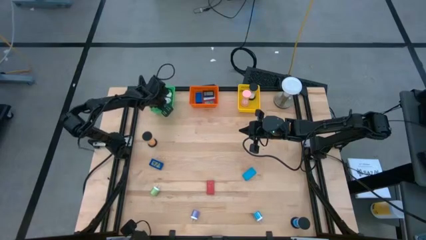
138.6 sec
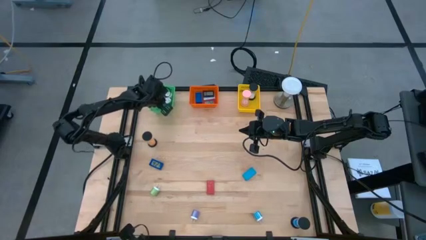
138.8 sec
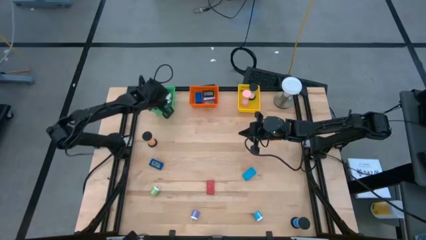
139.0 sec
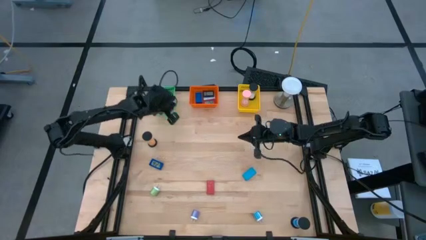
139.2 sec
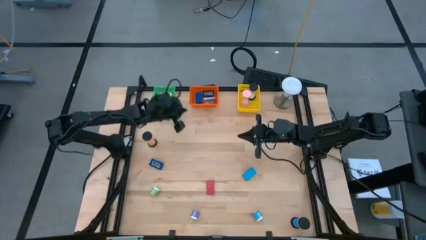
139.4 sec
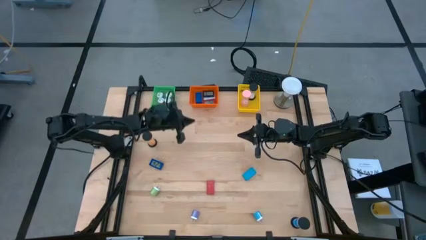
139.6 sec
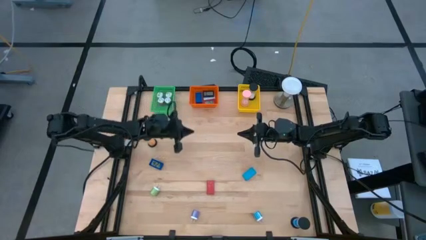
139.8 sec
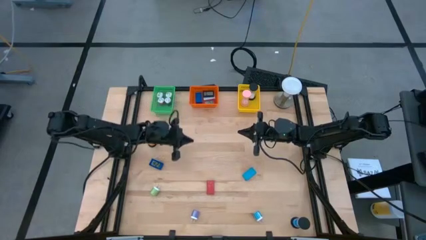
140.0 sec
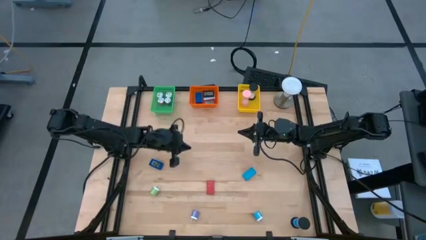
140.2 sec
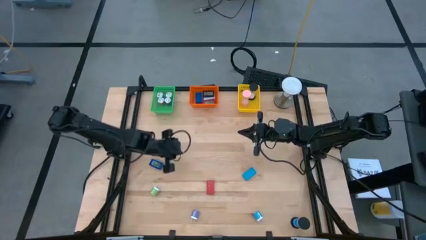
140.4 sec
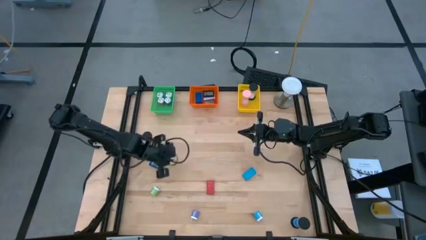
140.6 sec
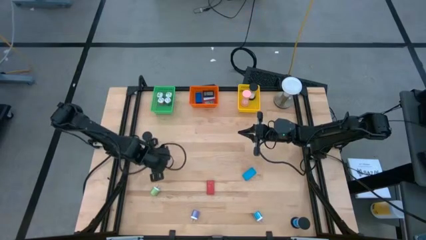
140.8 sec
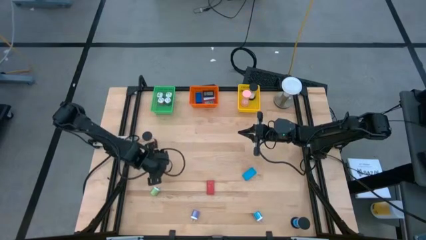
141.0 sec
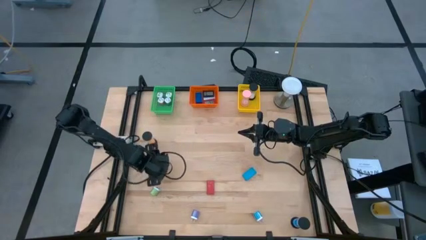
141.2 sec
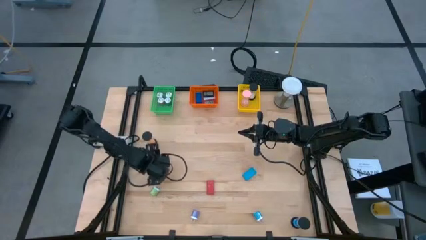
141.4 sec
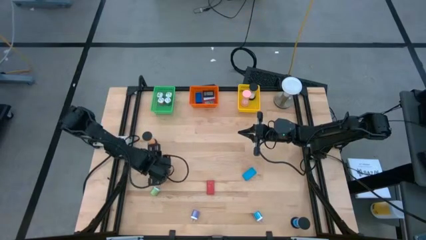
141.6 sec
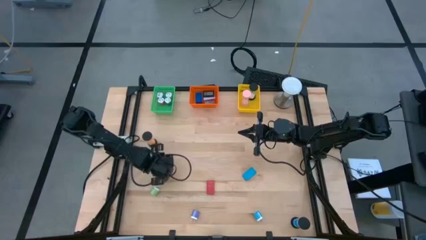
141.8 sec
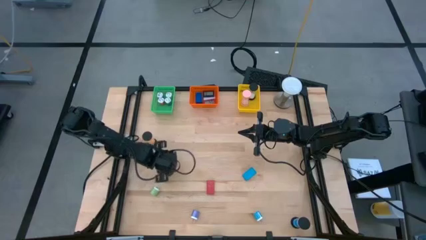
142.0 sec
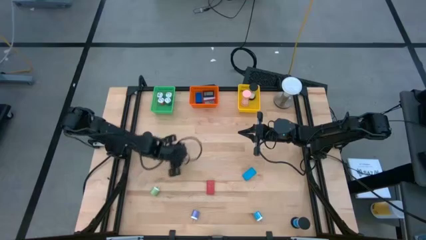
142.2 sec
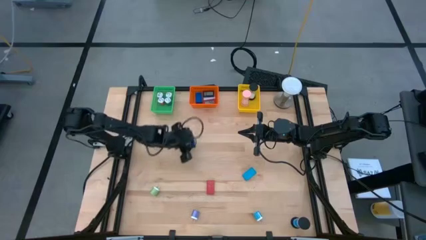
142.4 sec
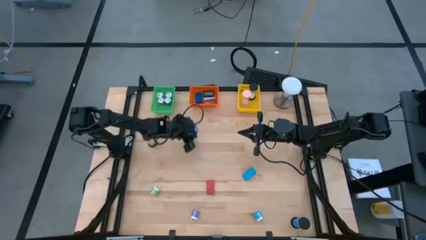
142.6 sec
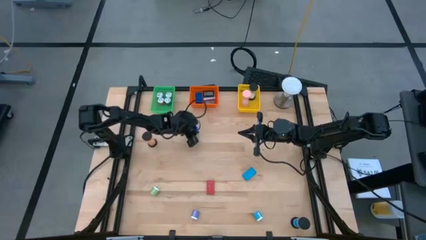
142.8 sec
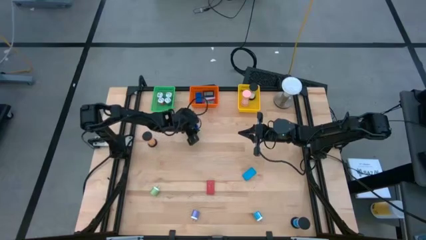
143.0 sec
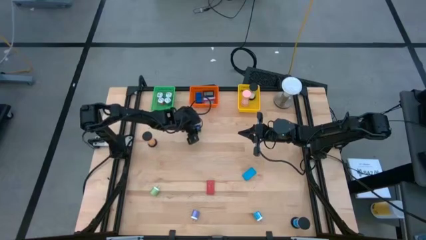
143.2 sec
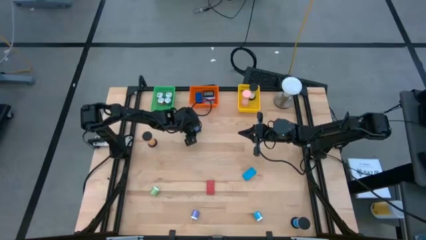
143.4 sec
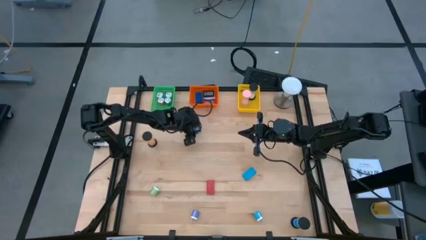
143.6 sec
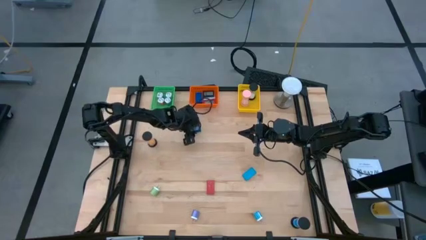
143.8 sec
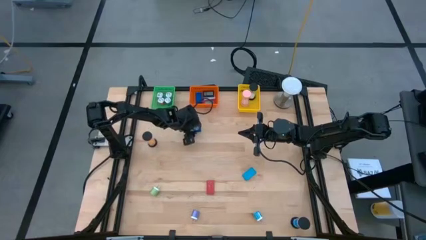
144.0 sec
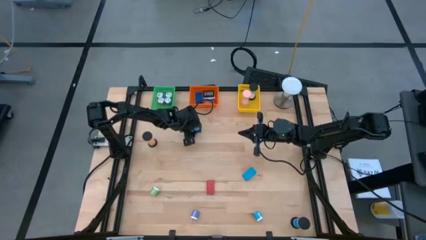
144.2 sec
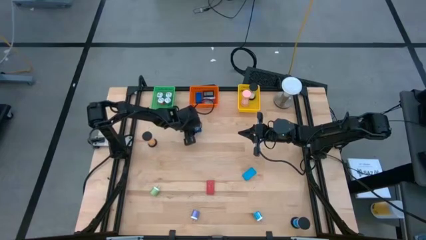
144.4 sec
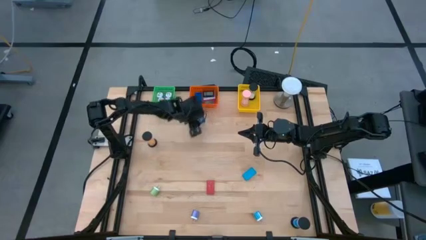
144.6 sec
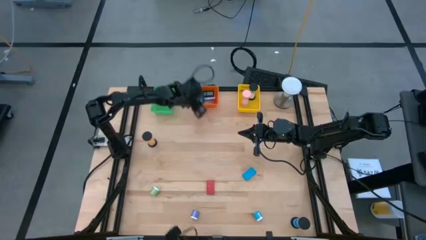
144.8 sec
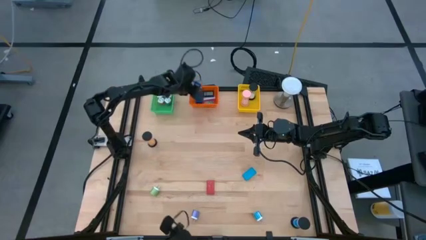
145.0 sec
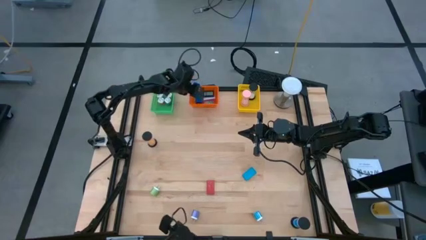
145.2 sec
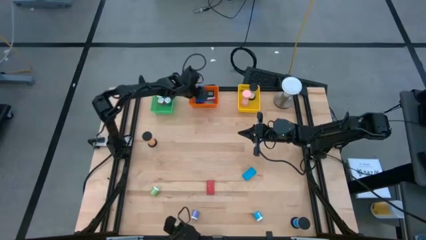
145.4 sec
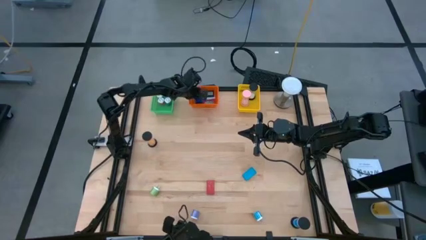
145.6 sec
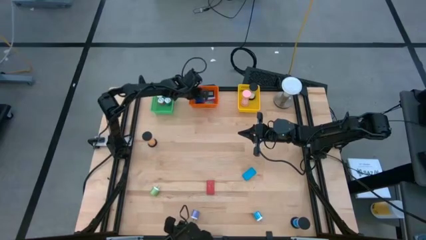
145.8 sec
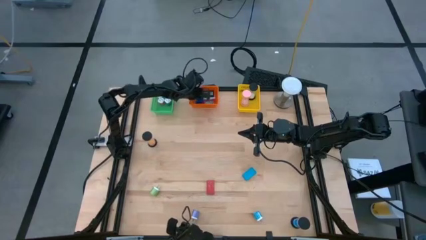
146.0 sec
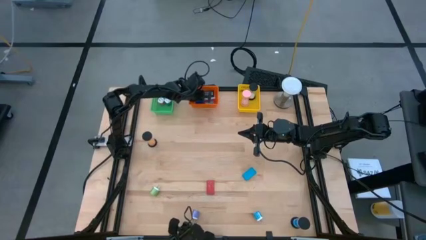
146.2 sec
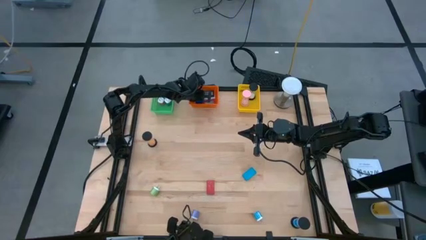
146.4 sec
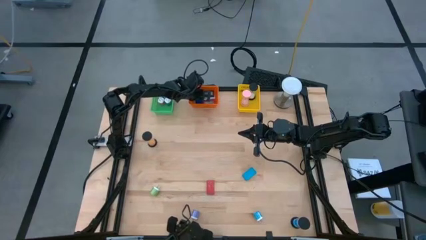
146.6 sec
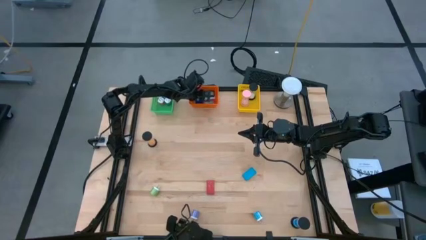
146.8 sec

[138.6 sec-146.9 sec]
Task: Pick & Place Office items
Put the blue digital clock into the orange bin

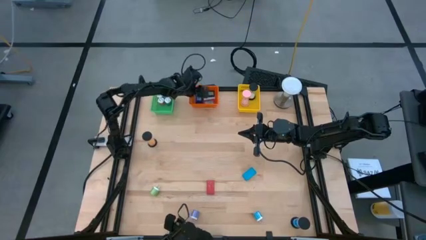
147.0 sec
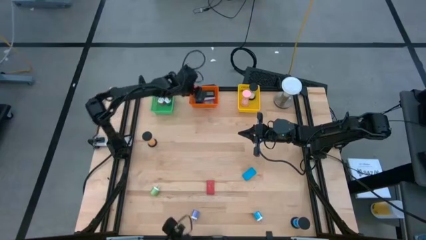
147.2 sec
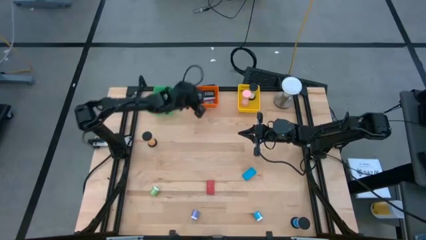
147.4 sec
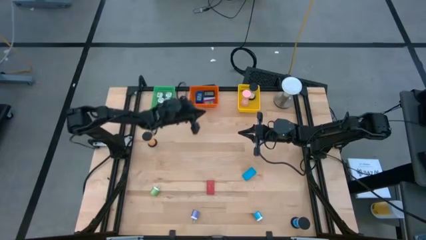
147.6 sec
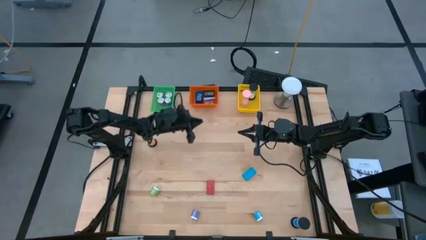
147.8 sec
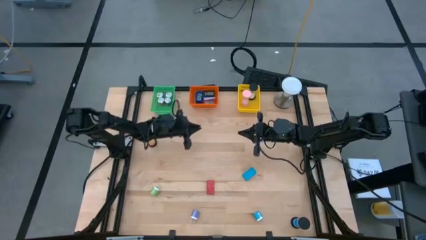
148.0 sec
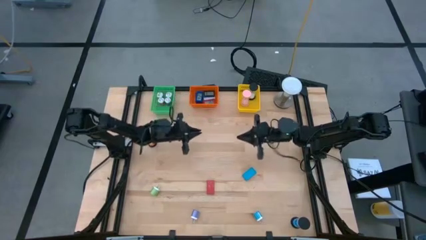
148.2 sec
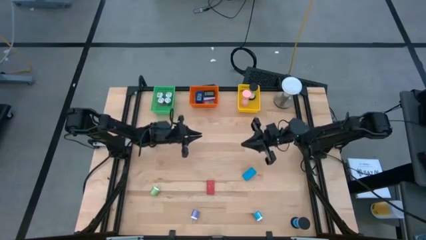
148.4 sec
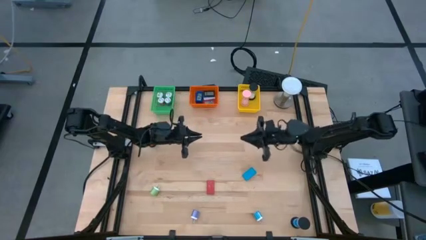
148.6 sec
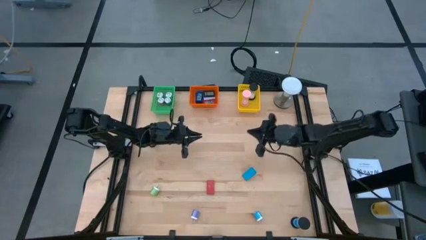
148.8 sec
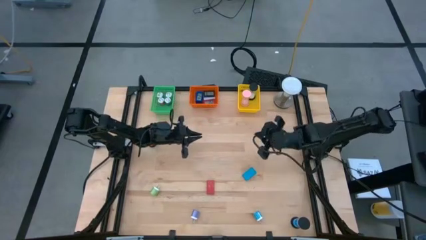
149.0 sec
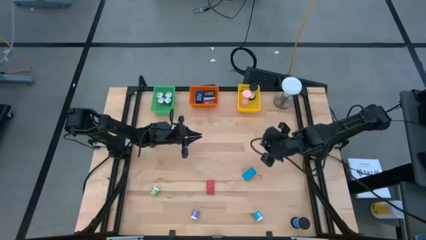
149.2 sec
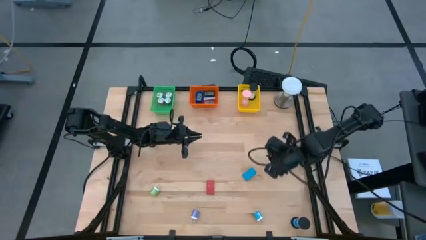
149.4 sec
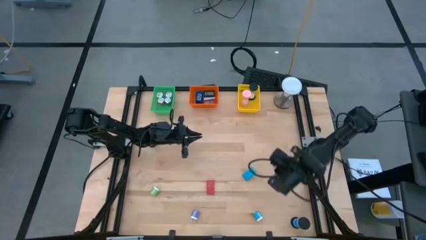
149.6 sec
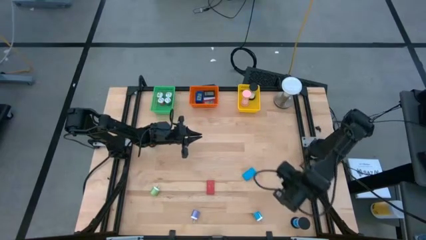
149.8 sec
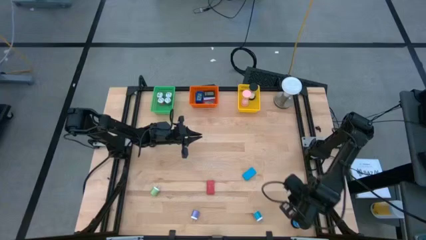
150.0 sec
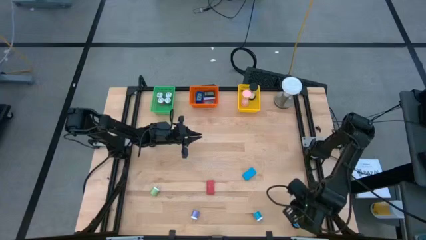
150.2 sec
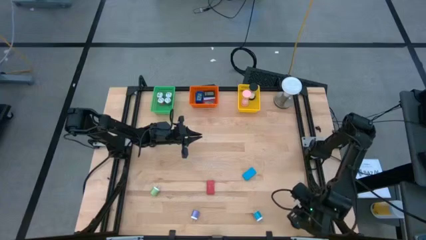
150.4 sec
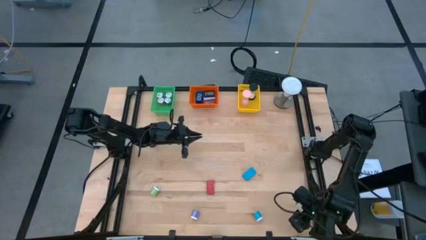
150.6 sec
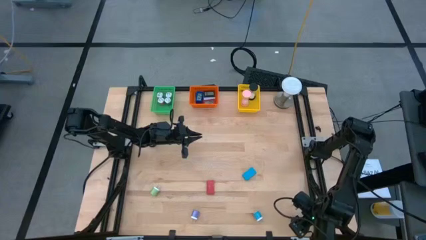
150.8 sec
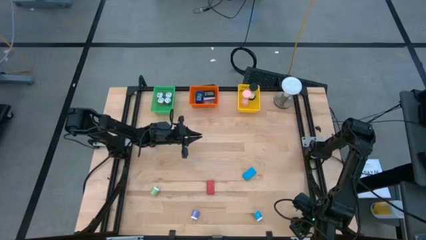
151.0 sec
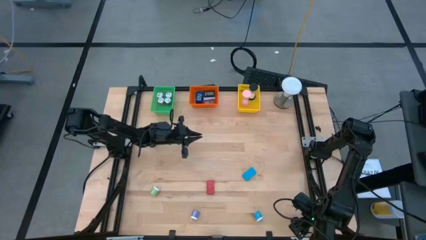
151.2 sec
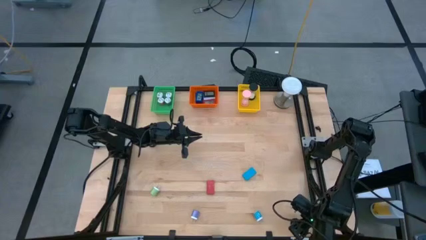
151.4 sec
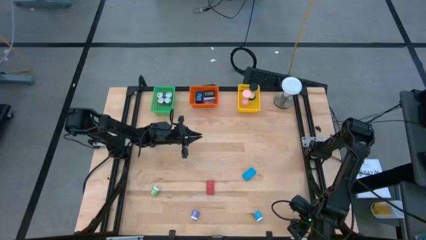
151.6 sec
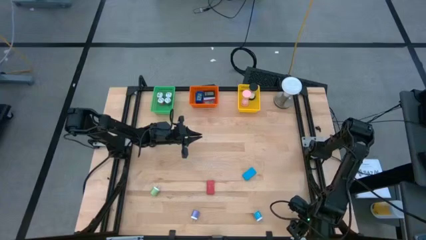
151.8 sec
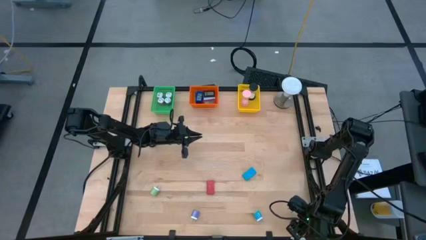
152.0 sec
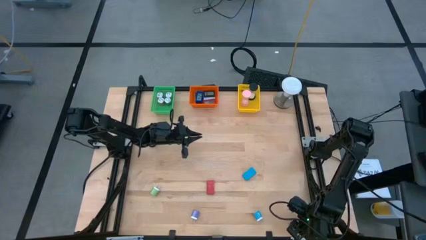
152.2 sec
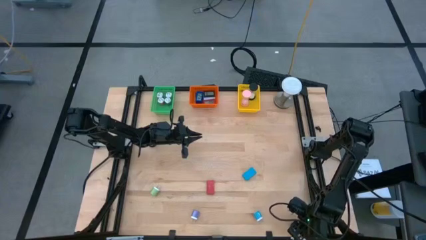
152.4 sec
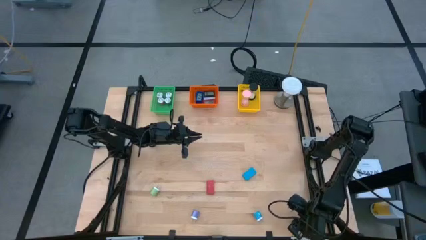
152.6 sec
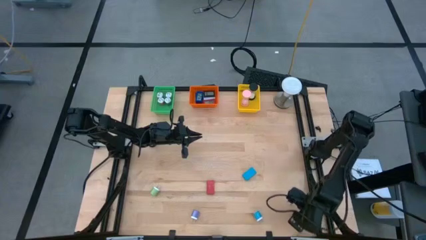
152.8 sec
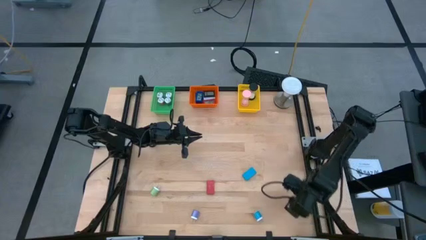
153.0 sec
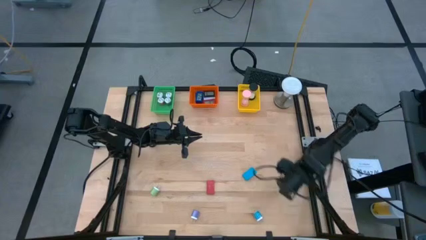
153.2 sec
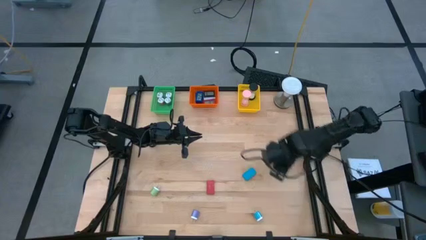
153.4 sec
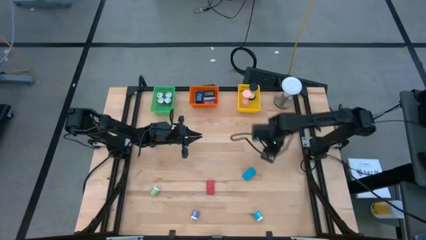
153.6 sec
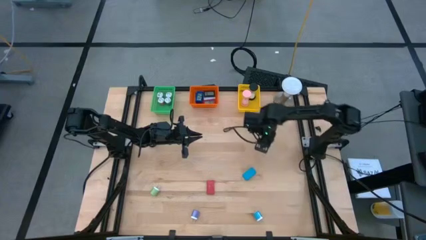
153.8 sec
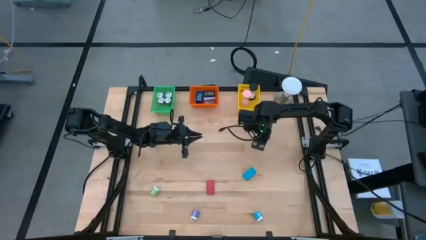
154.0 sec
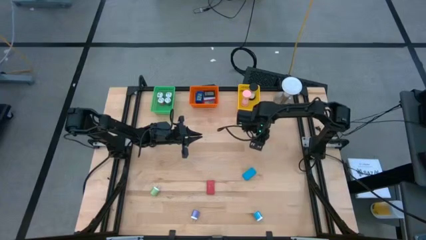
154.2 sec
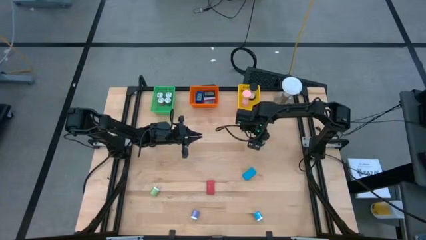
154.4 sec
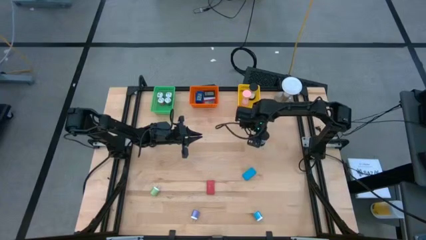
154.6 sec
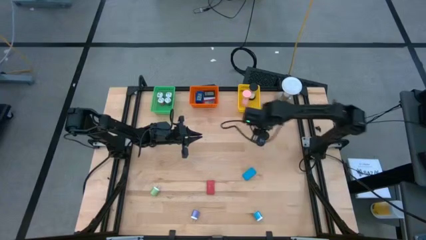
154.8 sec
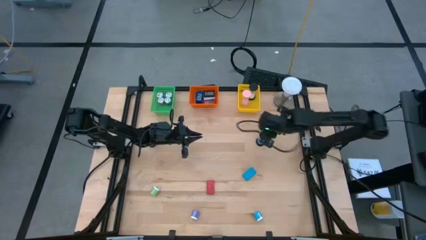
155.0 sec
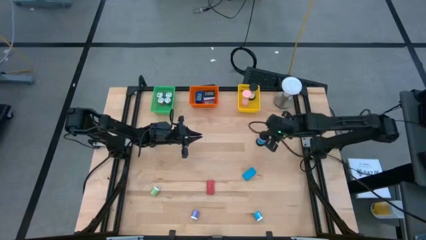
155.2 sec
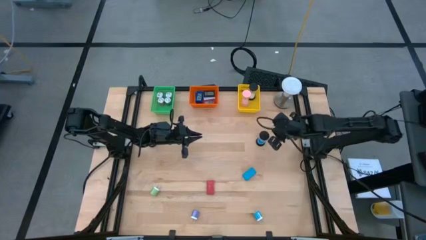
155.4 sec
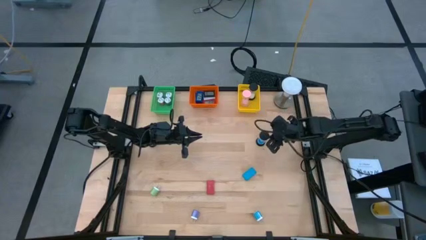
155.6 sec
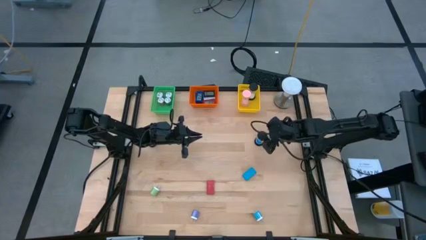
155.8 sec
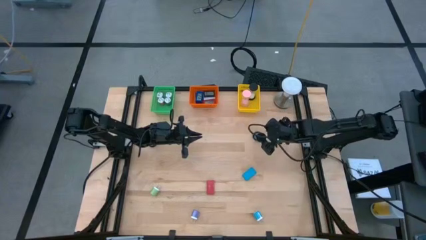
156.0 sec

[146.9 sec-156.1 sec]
Put the blue hourglass into the yellow bin
